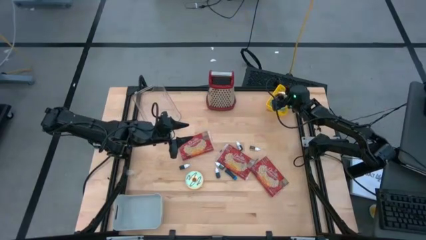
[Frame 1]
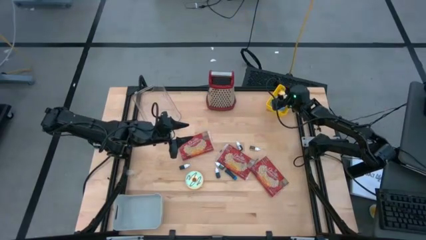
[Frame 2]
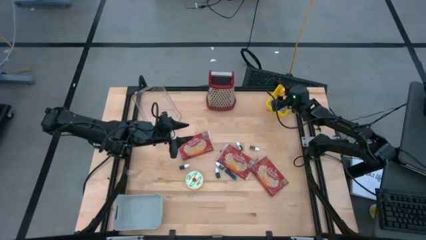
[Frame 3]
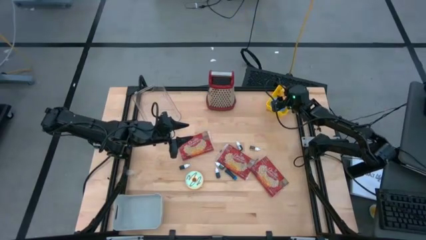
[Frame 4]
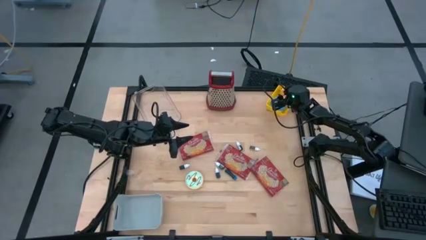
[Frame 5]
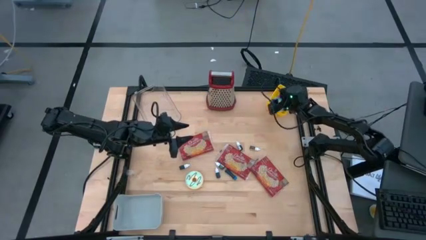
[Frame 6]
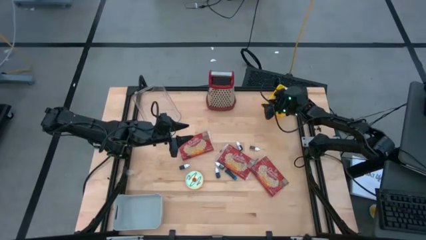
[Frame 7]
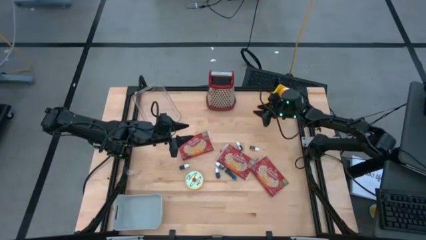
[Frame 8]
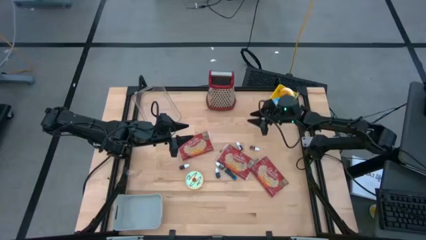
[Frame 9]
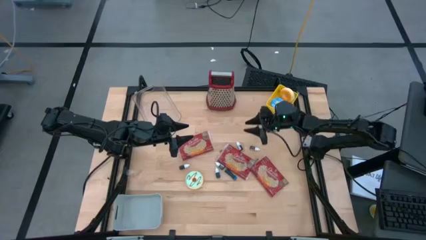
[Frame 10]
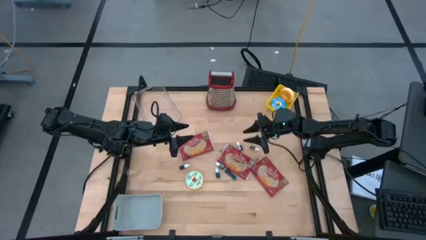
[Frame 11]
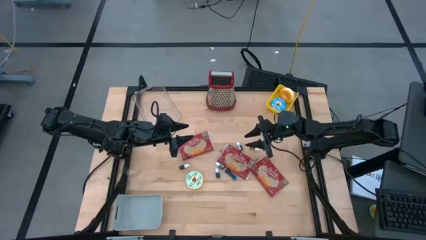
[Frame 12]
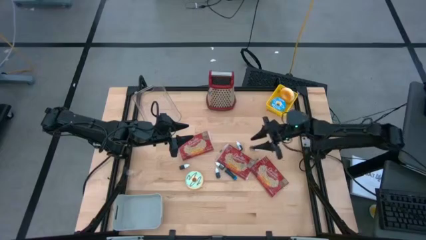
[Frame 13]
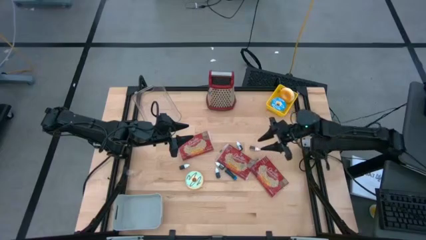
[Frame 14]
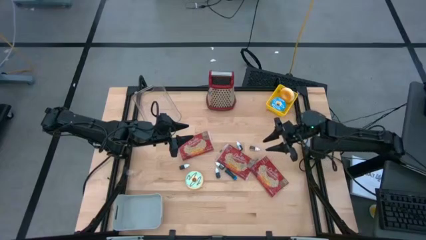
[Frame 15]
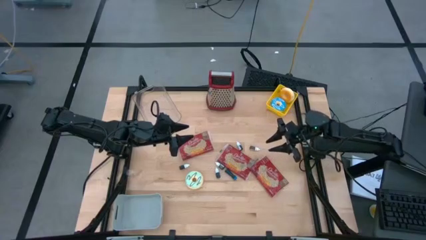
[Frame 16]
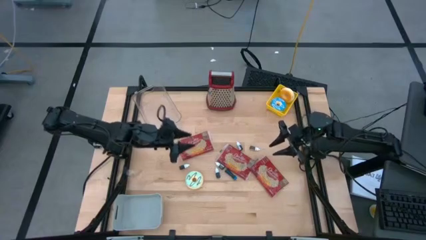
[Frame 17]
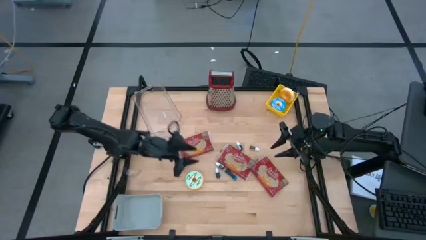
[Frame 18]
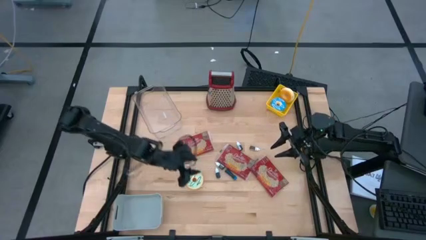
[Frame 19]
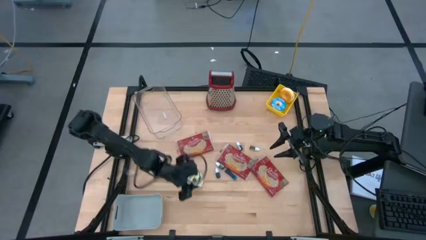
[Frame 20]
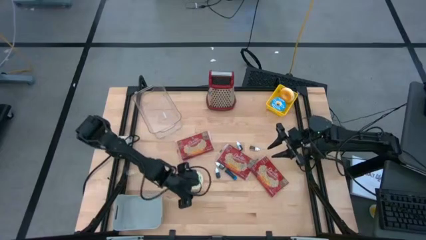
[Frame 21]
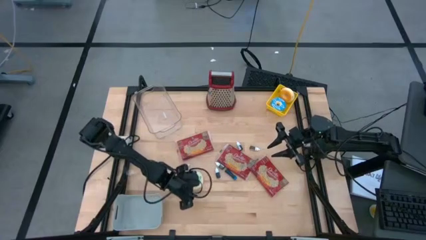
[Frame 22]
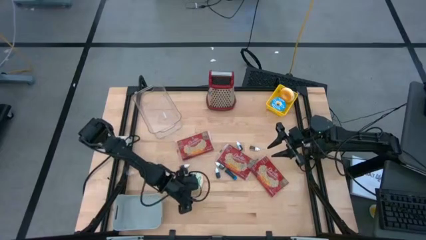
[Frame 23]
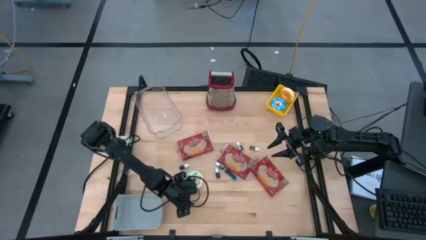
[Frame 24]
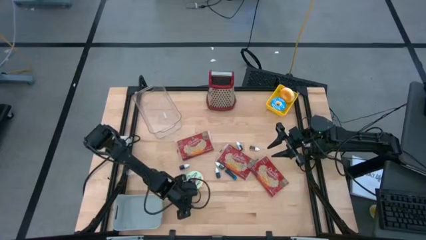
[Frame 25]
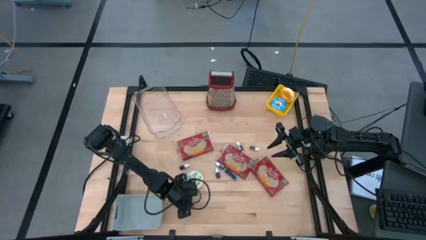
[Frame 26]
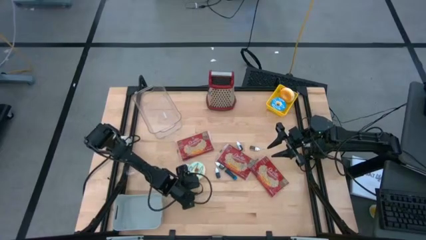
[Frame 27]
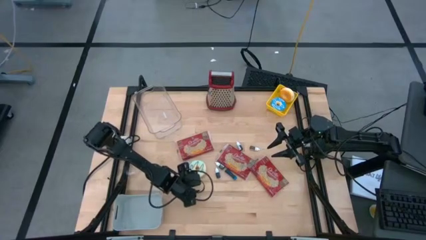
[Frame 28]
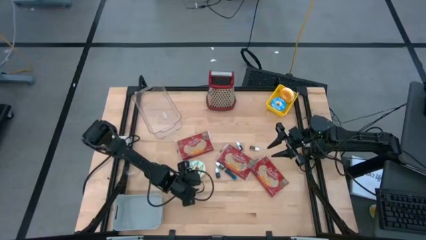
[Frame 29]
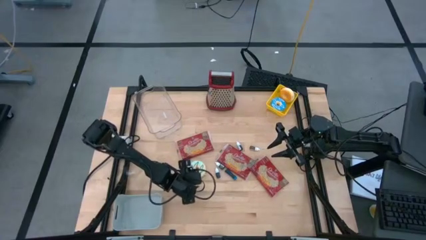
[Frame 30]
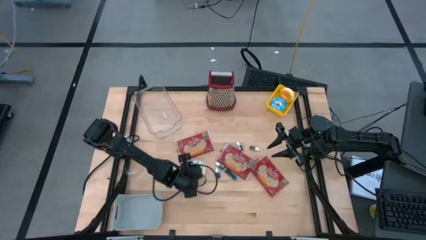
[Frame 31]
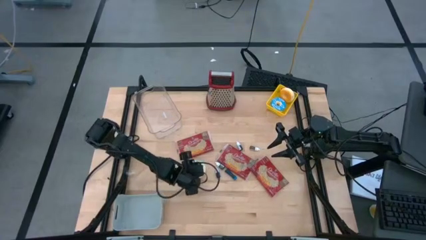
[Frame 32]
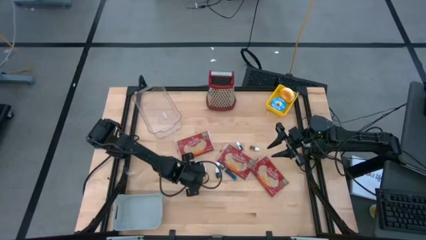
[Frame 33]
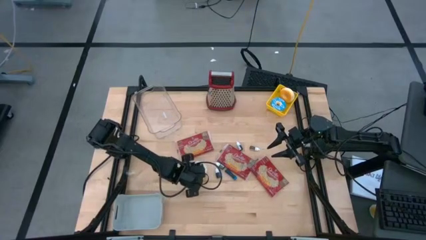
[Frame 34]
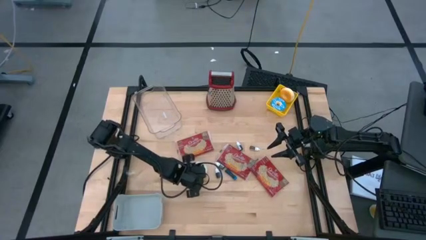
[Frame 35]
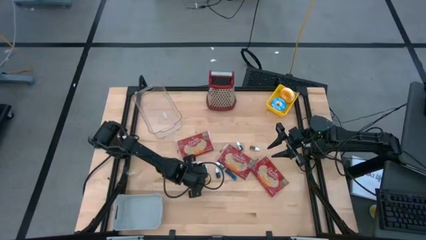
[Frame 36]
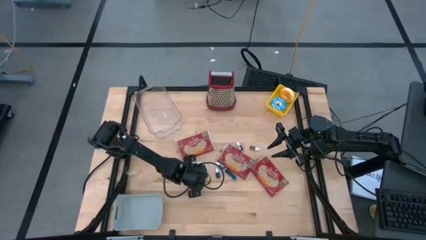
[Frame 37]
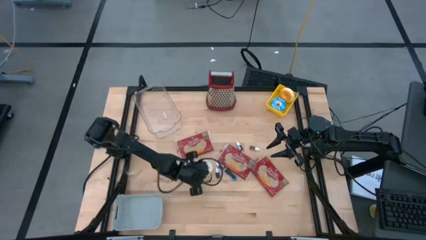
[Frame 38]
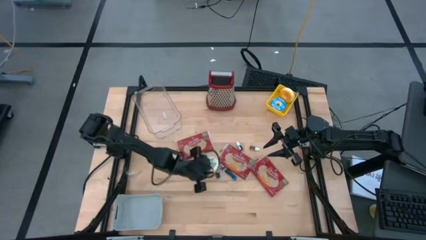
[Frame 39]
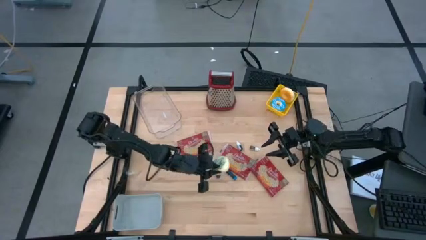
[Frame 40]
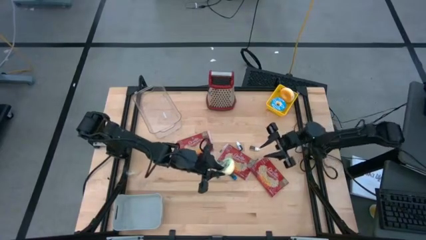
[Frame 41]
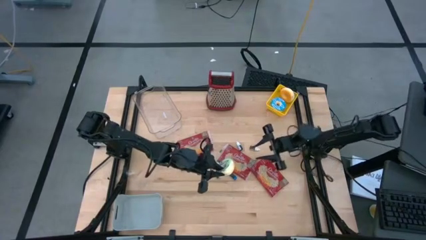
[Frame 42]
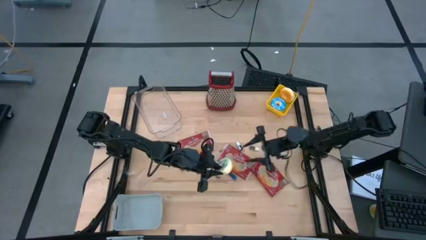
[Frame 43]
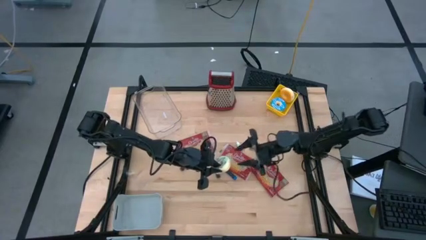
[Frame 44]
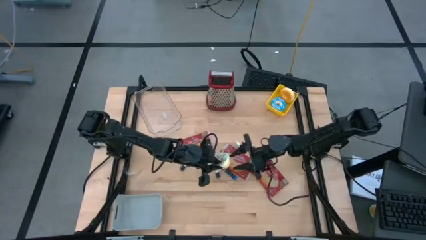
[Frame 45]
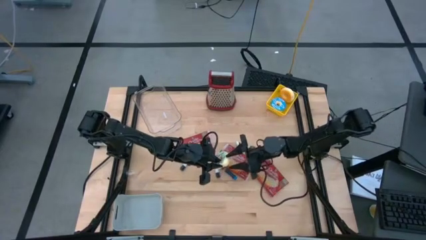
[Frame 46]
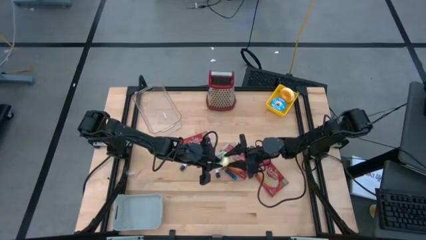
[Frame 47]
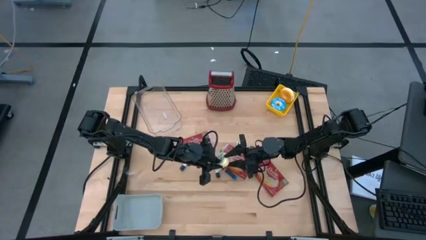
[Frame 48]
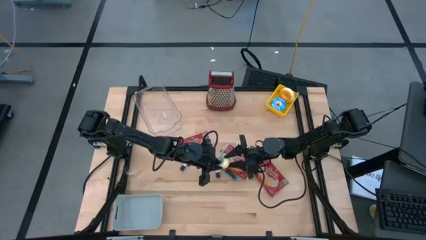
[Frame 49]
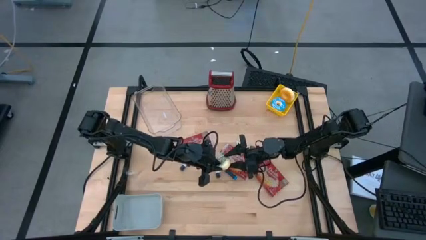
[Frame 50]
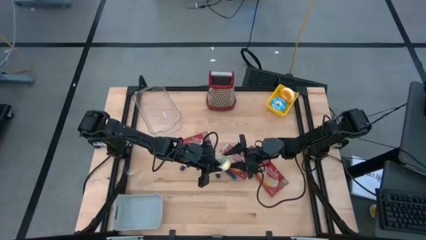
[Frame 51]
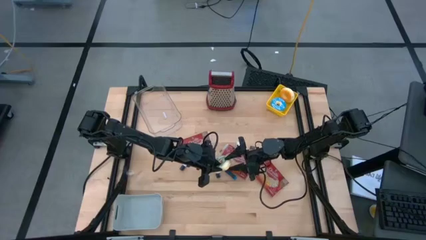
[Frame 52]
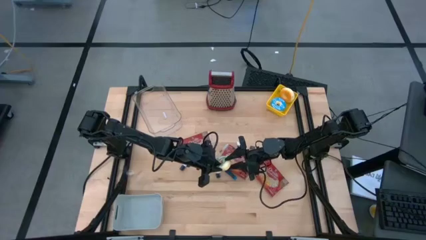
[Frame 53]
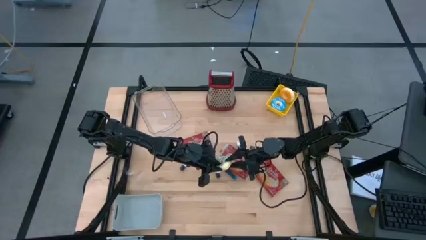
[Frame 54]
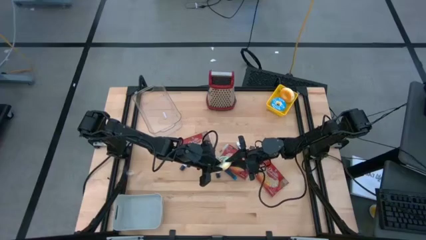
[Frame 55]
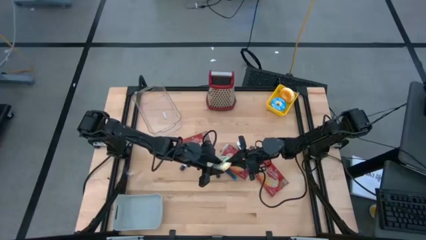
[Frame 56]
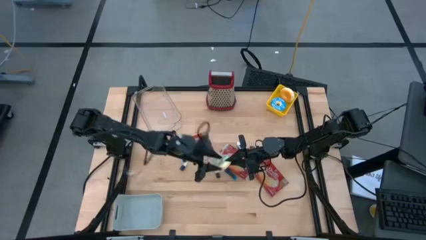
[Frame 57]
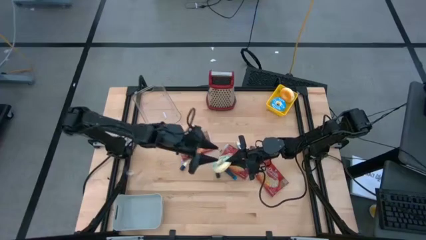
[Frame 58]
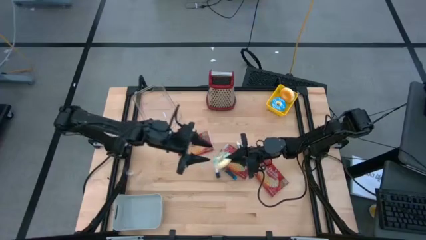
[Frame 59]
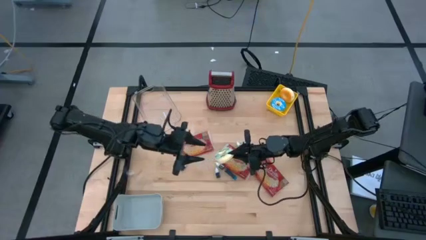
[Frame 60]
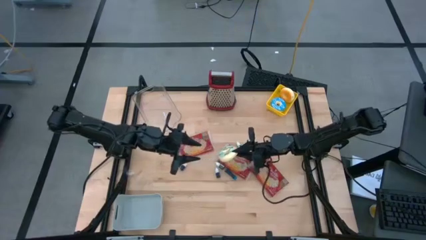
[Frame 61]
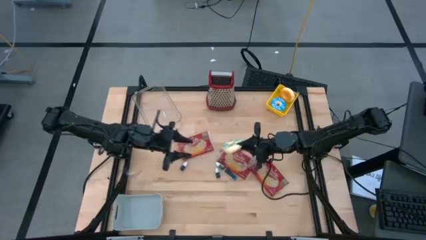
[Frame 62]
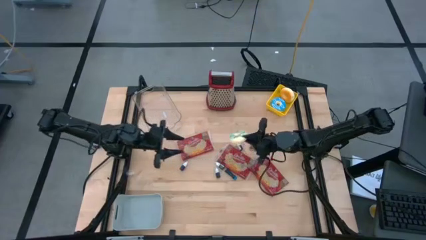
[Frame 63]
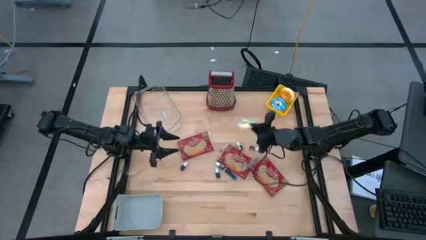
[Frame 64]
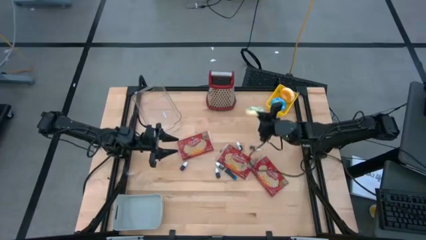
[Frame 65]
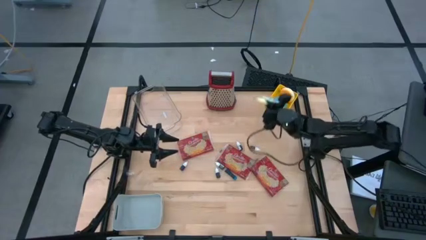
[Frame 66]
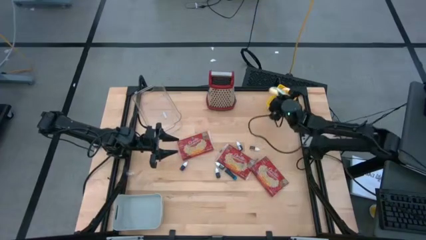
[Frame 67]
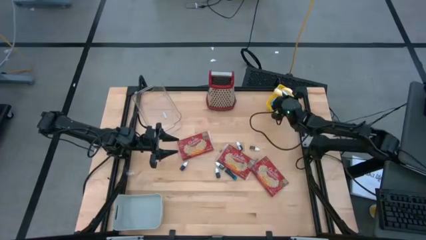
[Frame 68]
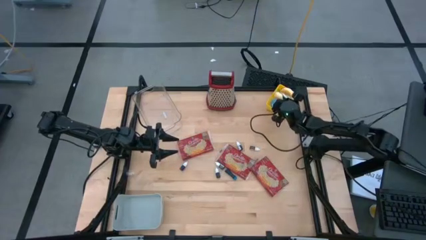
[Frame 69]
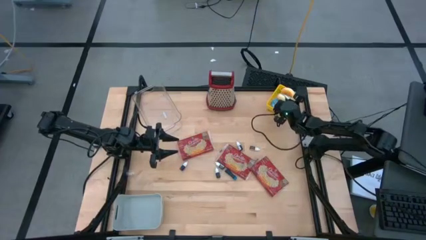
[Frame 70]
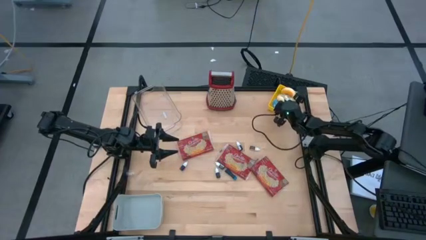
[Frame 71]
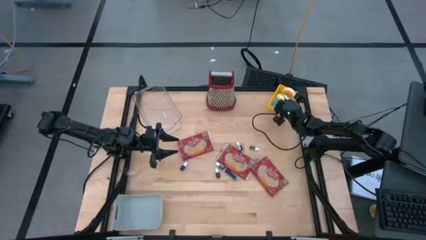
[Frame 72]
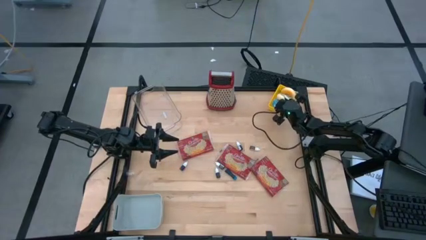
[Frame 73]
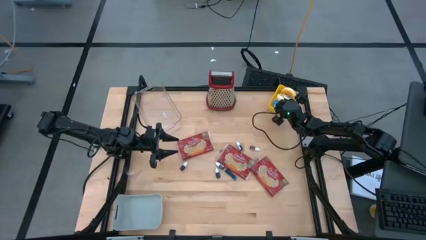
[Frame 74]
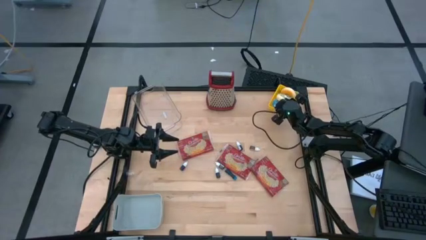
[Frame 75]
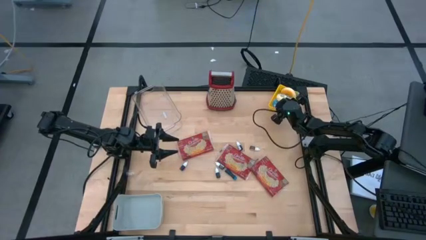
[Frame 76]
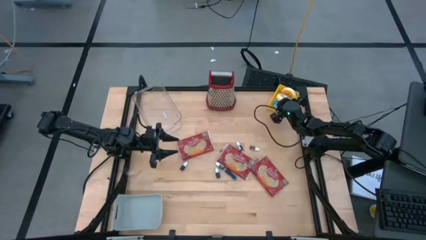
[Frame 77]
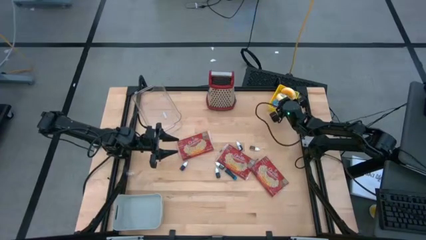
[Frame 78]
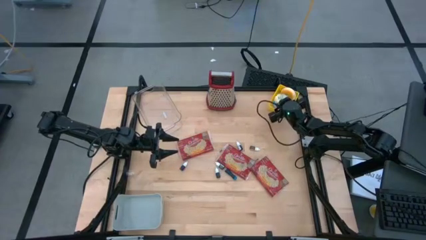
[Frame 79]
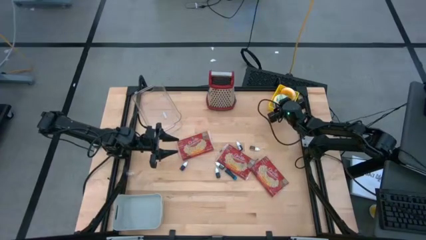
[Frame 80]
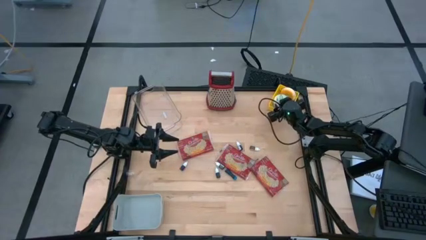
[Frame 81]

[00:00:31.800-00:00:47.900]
Put the sky blue donut into the yellow bin
